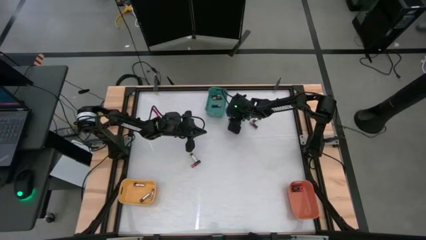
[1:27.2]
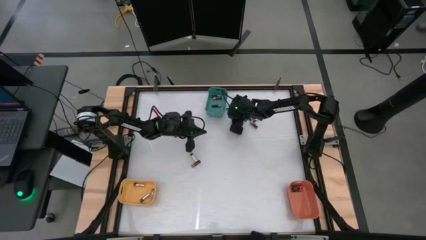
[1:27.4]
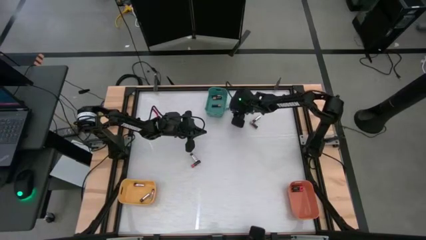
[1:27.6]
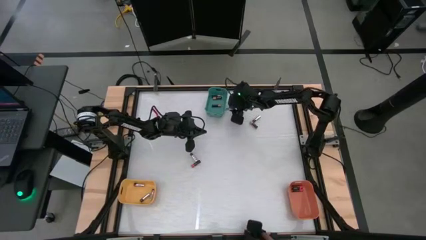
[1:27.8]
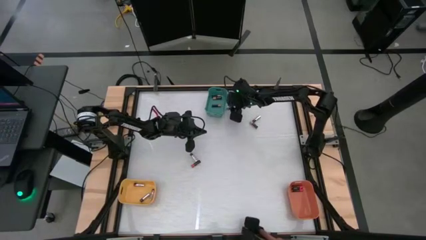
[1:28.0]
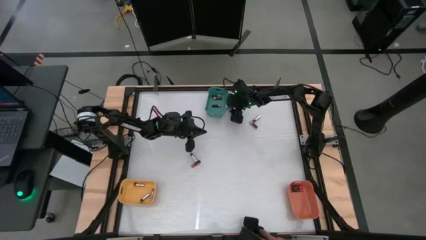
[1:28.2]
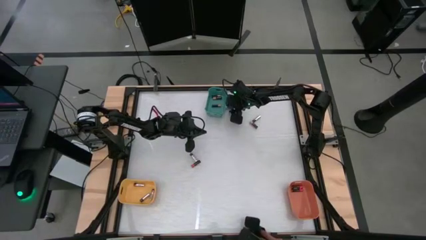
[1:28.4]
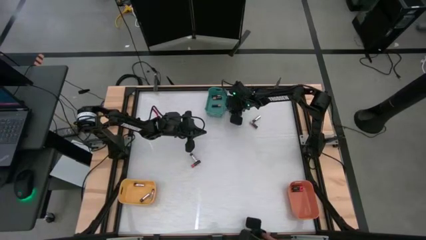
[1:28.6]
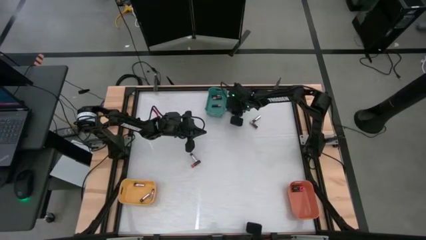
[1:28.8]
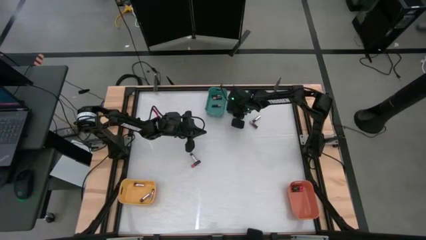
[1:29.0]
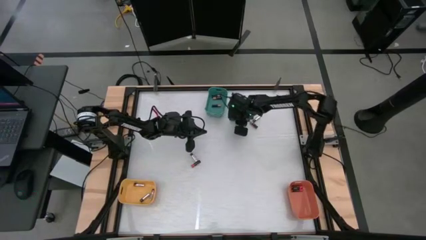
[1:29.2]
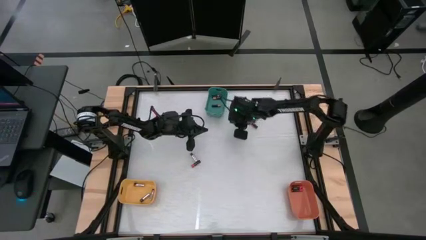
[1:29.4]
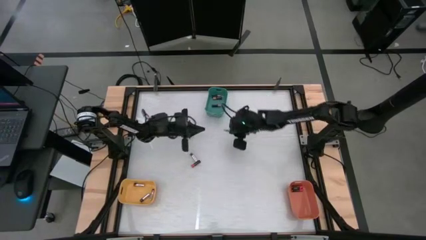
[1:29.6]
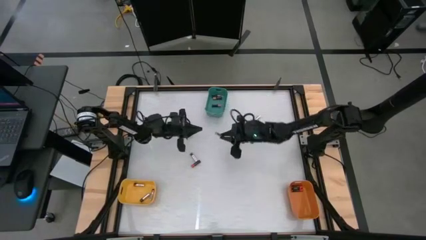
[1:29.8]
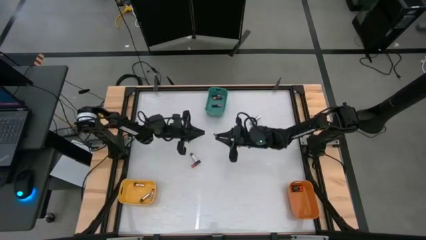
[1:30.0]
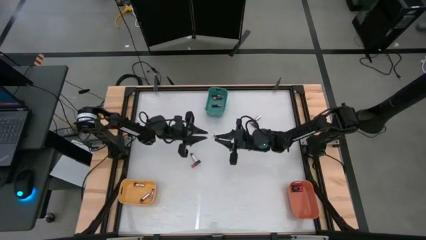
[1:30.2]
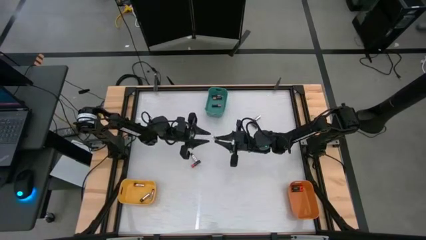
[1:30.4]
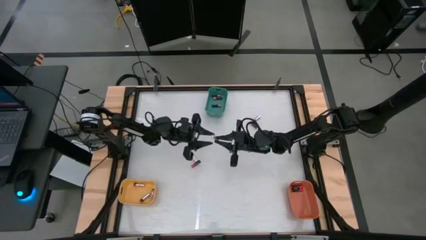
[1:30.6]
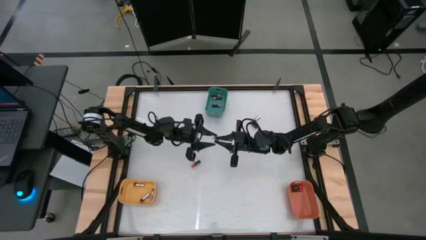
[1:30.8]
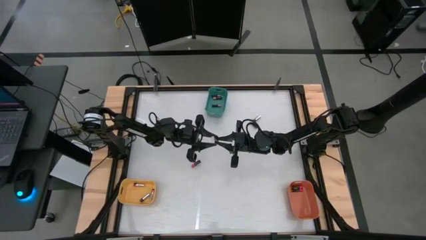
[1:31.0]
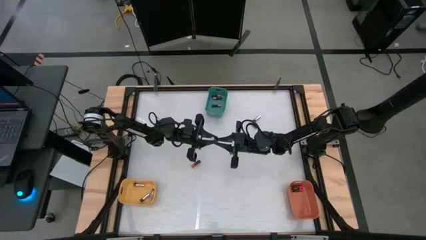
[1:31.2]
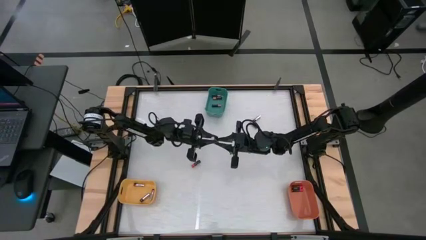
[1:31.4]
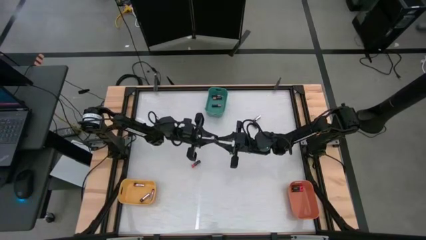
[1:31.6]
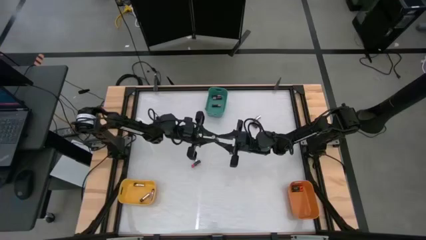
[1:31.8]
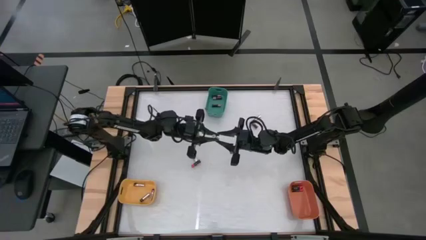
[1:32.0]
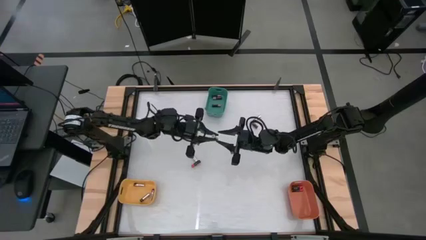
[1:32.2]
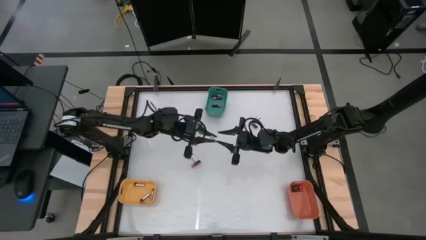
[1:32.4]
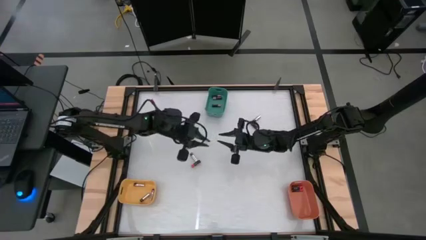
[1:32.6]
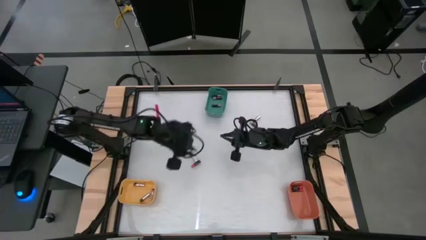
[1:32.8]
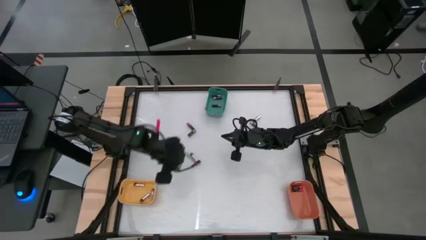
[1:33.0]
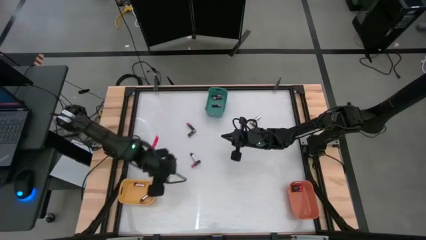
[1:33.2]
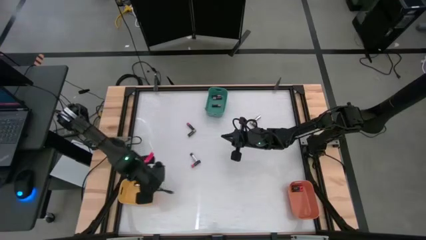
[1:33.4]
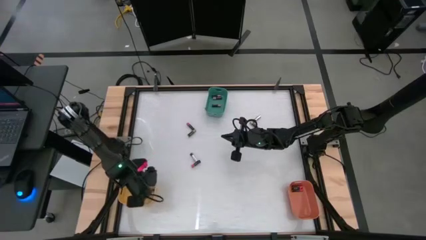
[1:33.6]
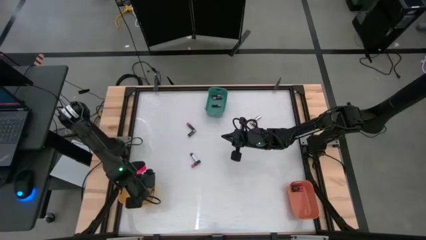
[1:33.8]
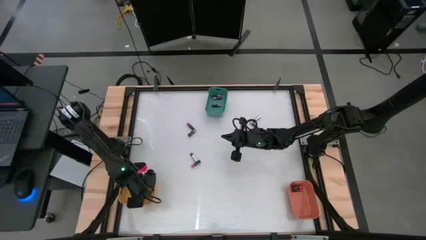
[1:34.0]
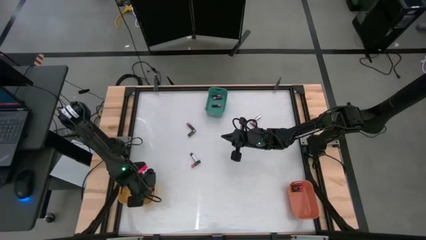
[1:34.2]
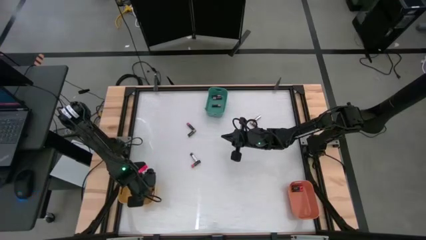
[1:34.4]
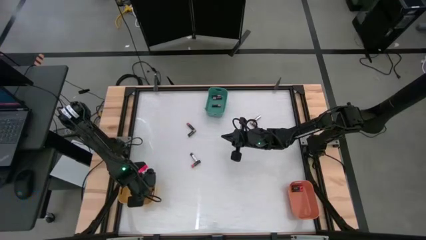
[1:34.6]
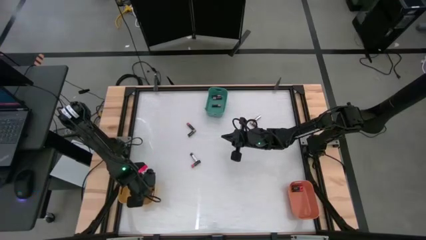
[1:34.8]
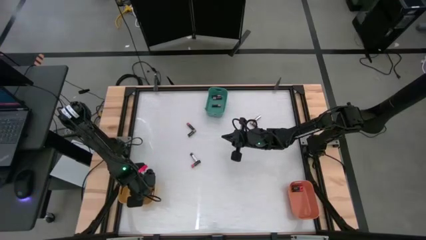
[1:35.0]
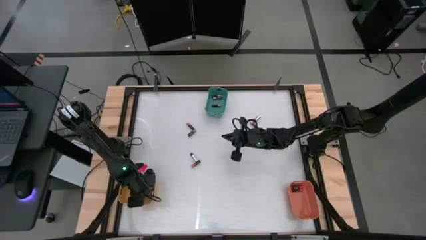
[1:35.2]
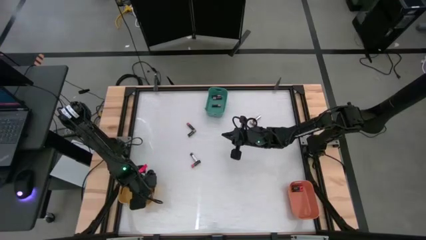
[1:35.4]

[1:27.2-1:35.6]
Task: Sort batteries
Put the silver battery into the yellow bin

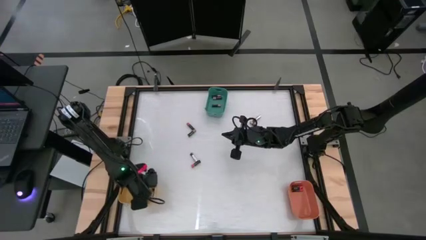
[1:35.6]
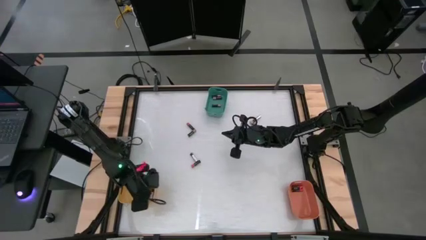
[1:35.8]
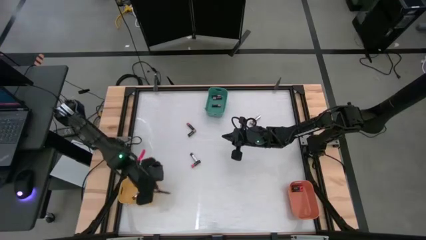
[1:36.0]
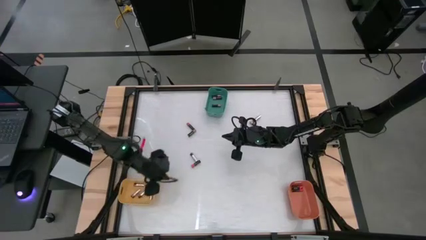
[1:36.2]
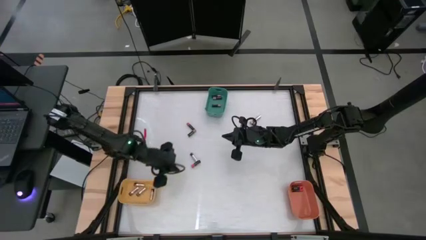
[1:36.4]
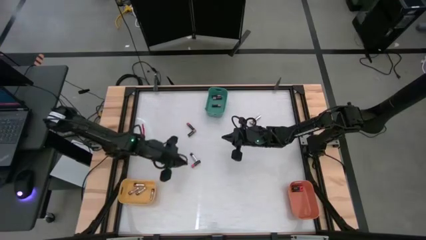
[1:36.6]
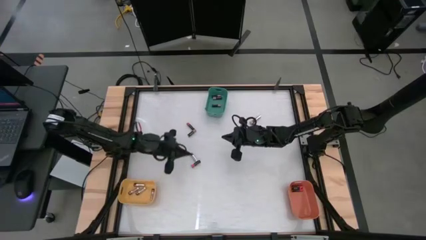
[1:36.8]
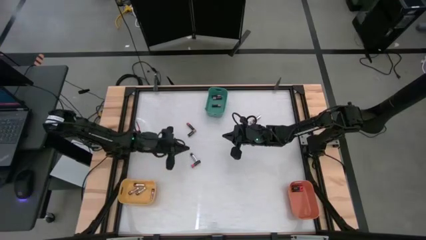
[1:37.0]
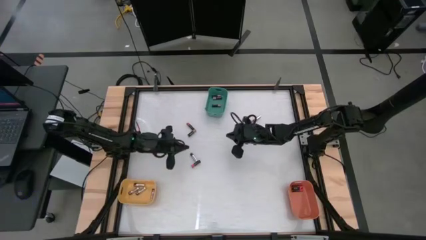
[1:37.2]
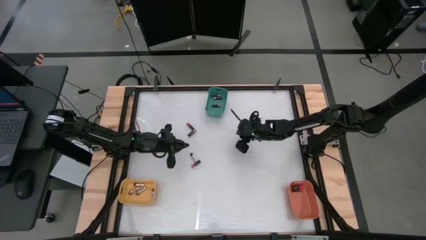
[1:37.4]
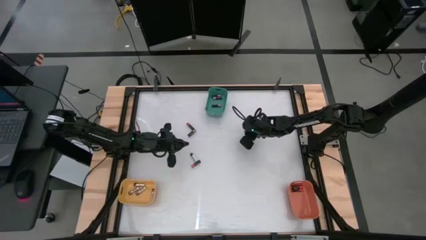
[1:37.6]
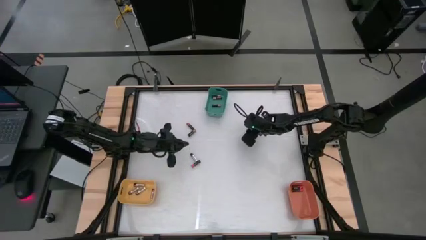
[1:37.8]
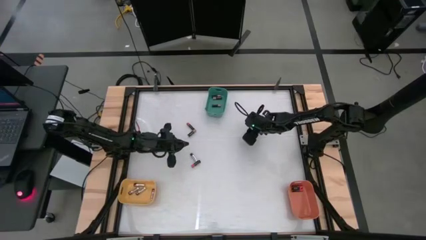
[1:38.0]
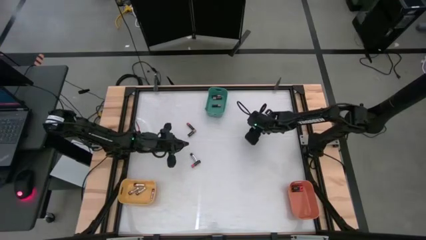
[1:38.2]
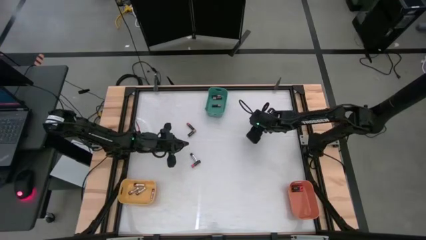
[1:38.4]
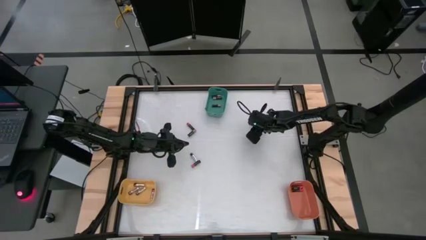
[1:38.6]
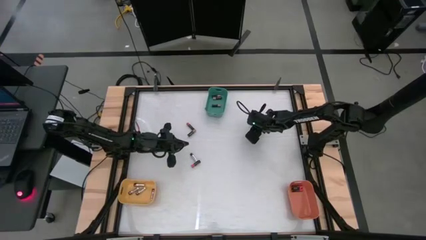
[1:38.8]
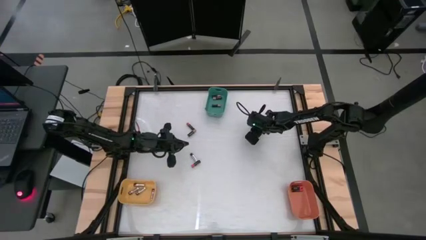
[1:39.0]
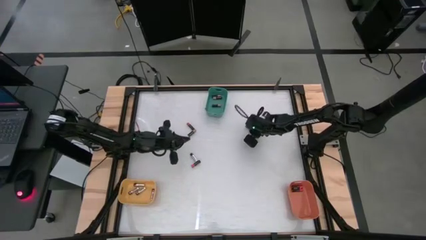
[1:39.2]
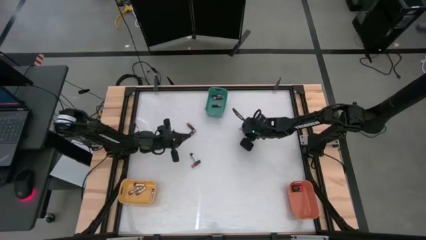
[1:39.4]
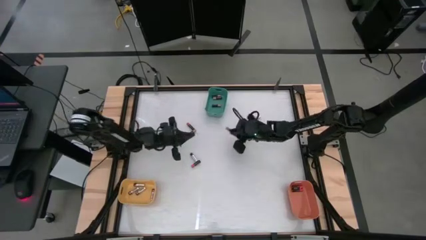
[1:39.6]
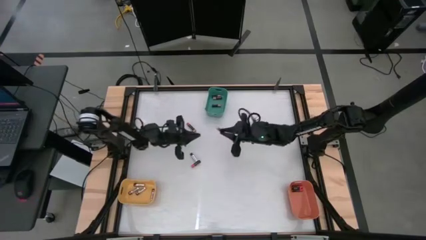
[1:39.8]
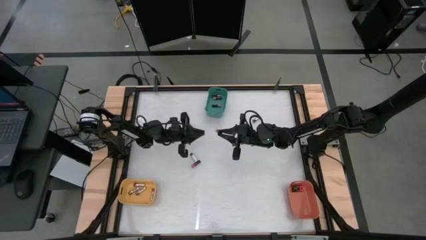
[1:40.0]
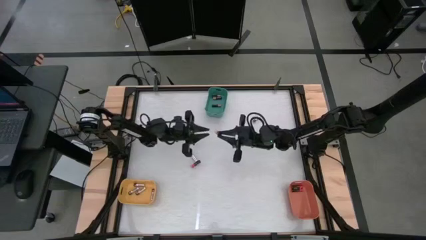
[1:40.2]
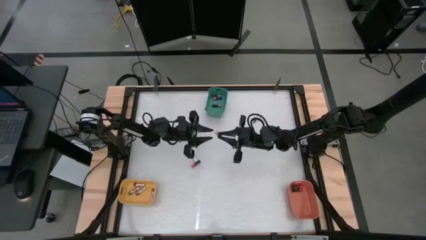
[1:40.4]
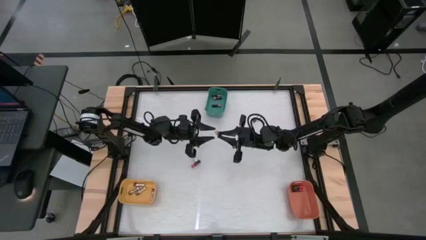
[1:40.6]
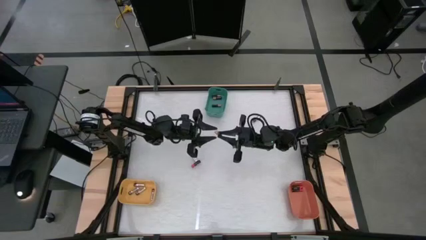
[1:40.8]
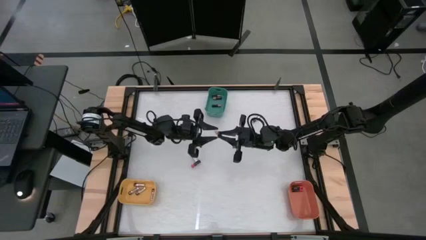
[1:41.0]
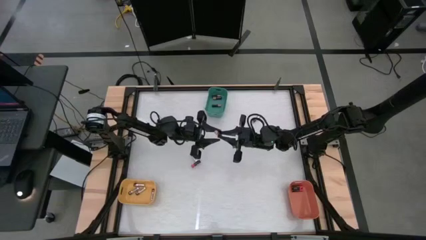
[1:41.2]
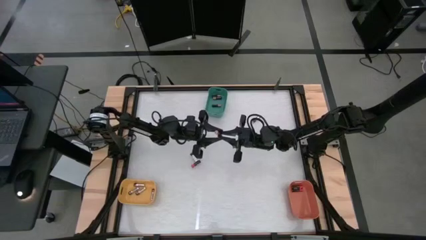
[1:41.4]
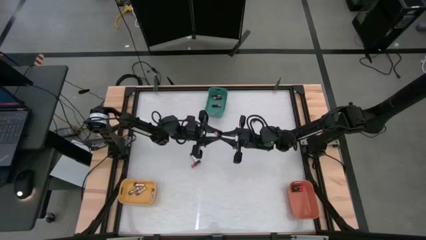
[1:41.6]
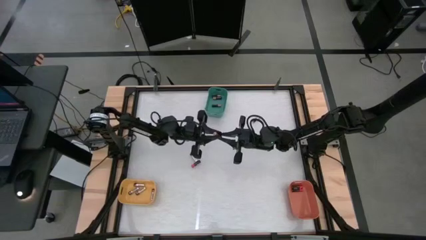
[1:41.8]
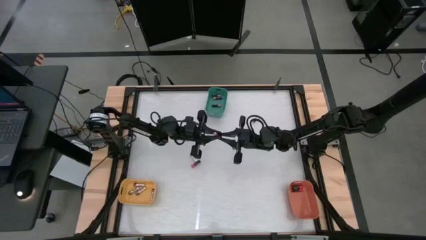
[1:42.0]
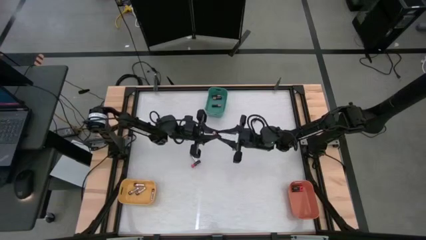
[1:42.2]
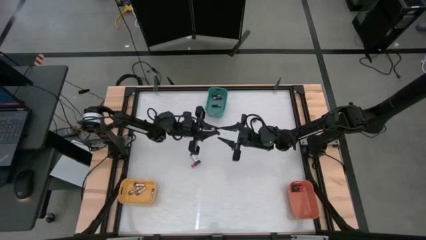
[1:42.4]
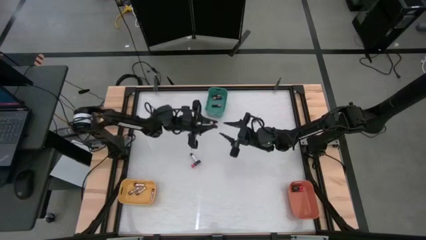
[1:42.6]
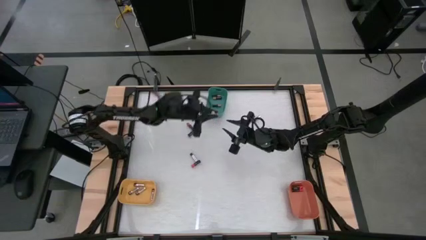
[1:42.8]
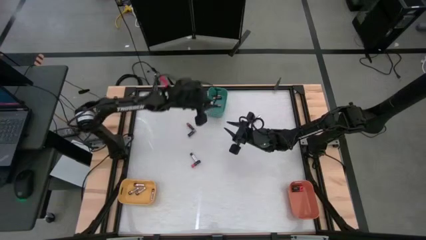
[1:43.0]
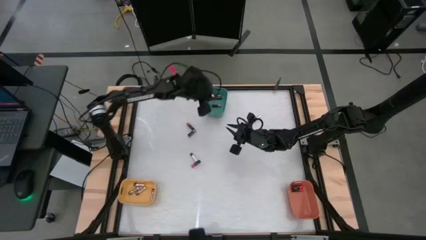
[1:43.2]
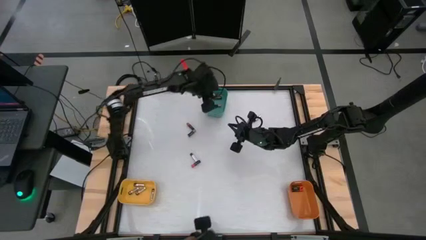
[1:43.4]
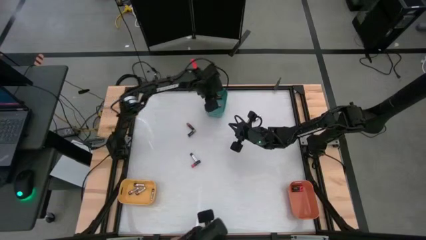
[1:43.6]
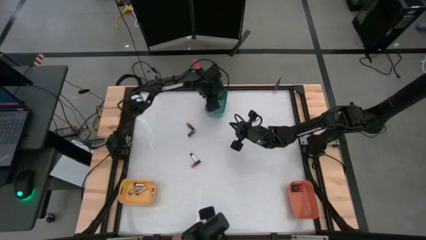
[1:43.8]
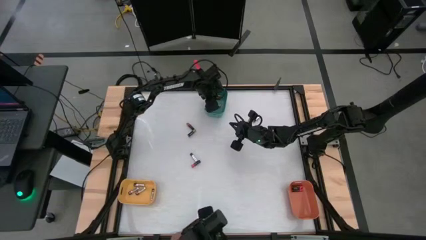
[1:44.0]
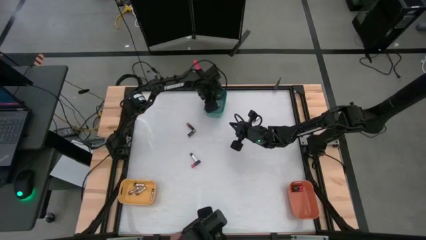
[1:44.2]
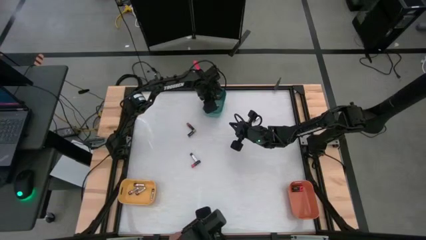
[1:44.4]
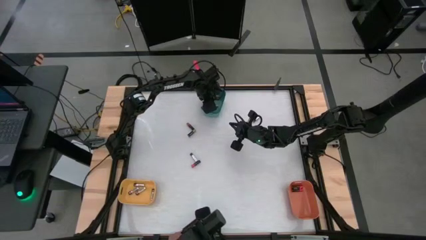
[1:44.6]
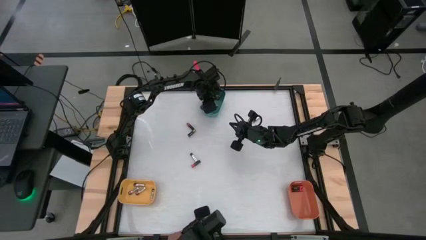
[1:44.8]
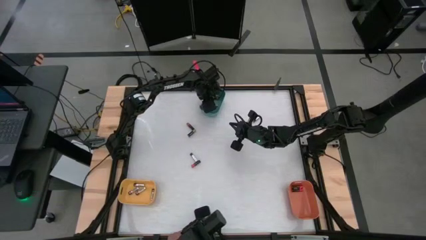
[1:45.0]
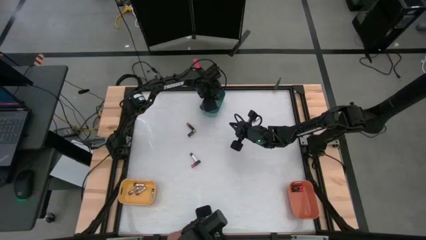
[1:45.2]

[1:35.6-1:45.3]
Put the brown battery into the green bin
